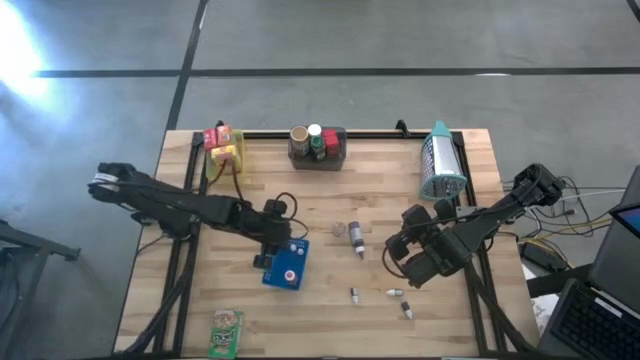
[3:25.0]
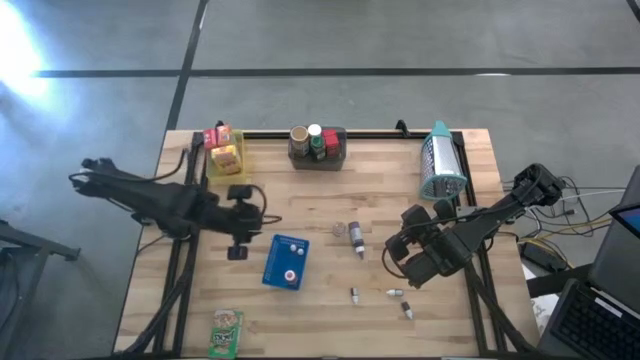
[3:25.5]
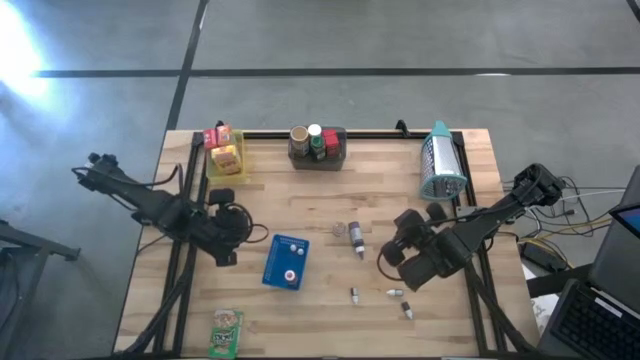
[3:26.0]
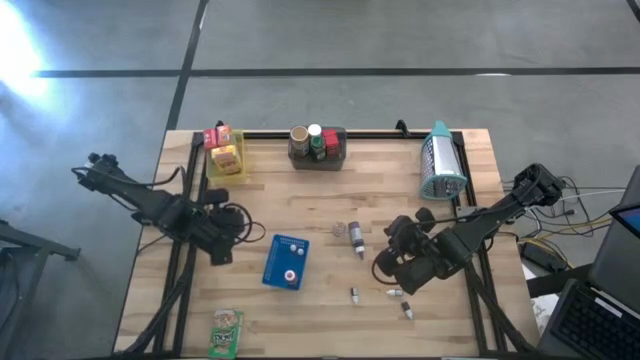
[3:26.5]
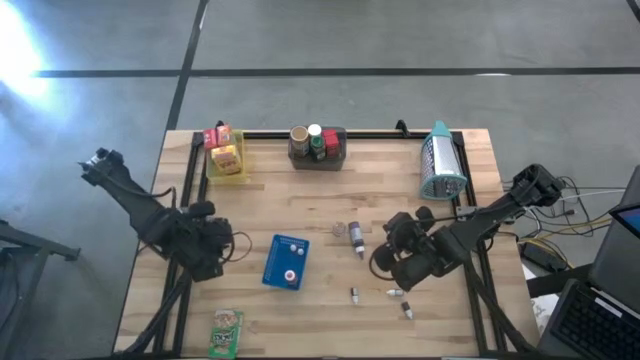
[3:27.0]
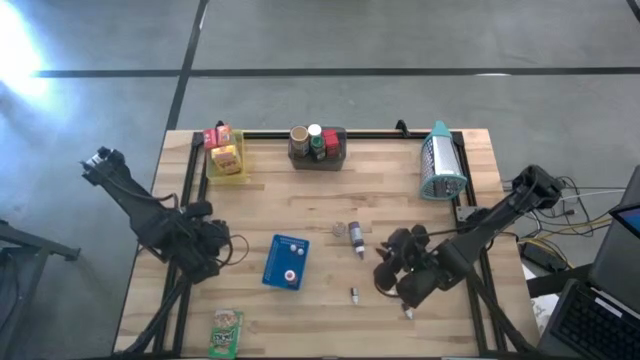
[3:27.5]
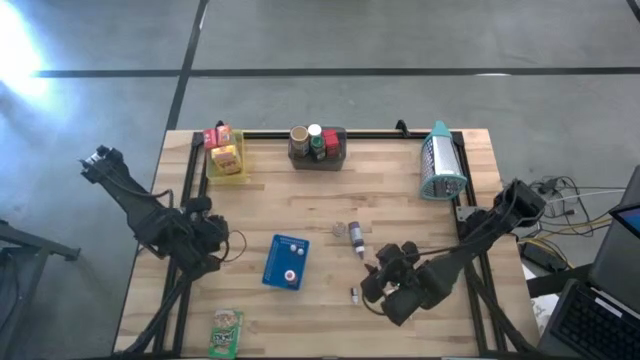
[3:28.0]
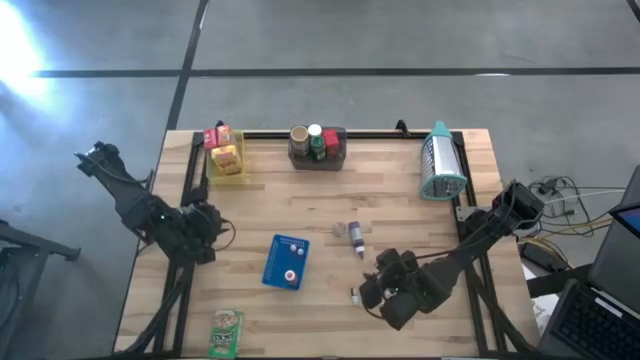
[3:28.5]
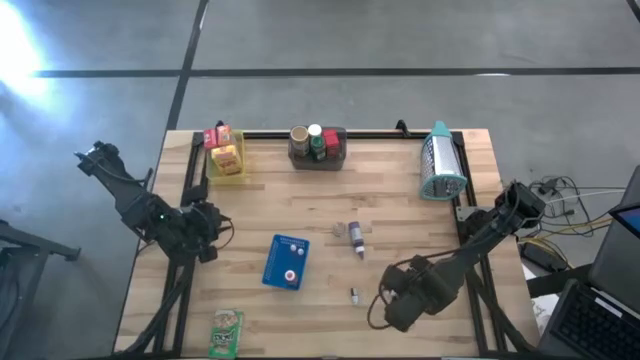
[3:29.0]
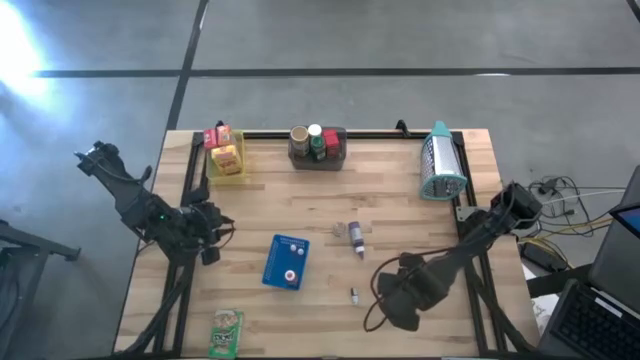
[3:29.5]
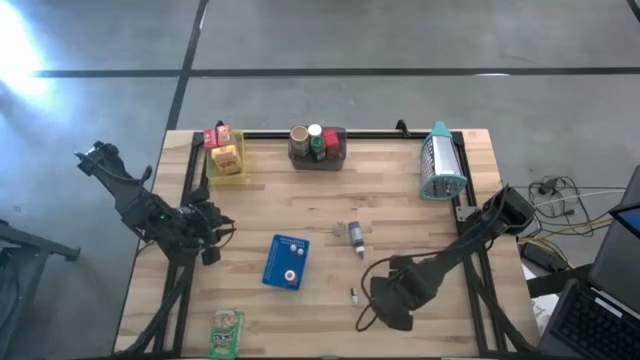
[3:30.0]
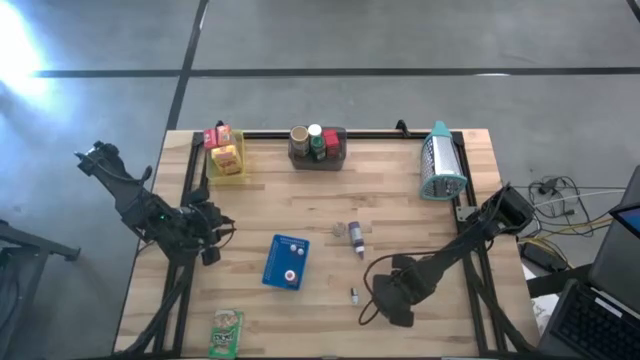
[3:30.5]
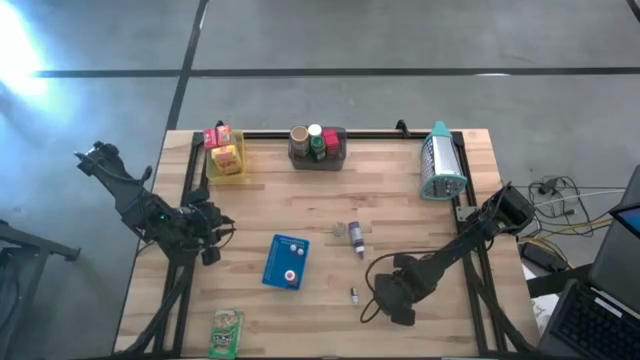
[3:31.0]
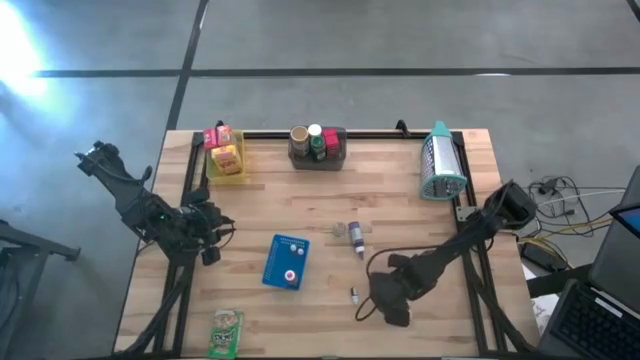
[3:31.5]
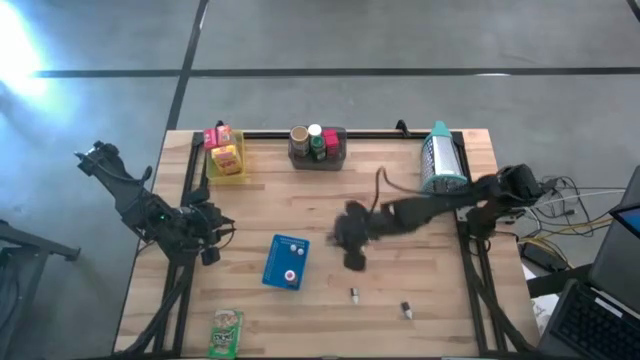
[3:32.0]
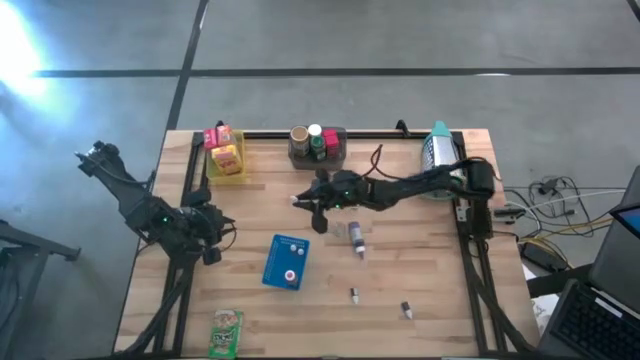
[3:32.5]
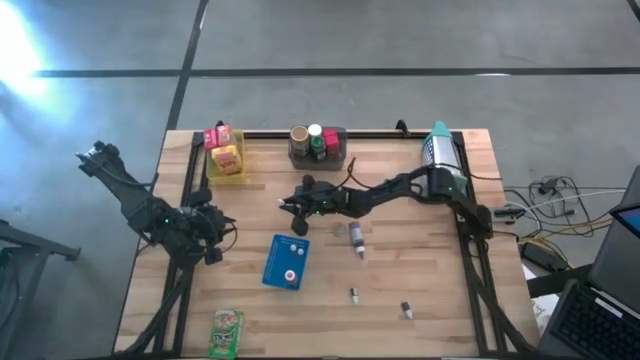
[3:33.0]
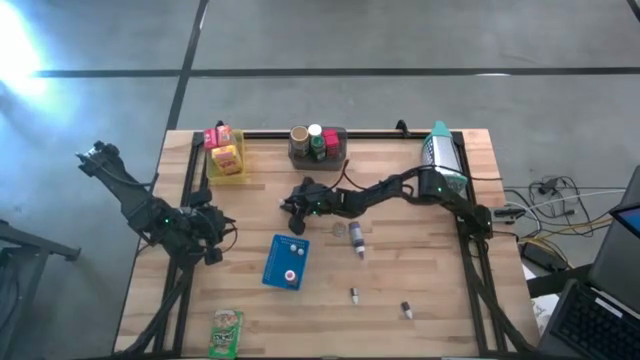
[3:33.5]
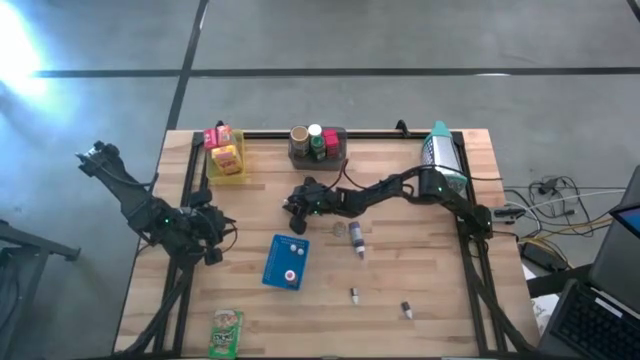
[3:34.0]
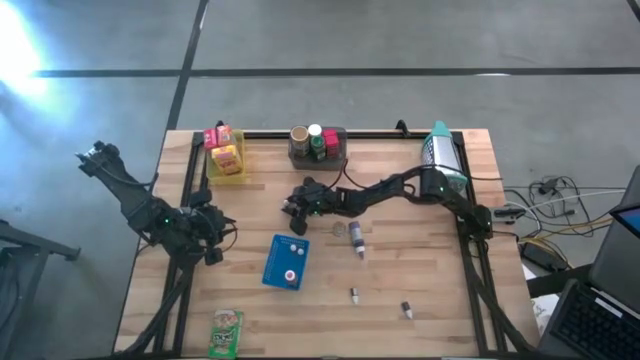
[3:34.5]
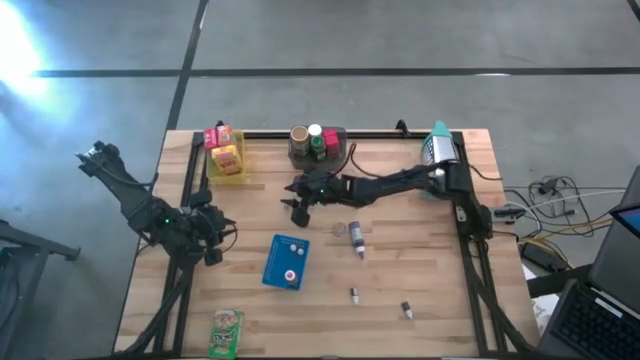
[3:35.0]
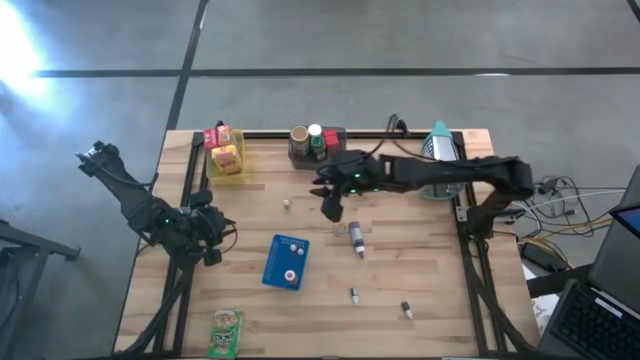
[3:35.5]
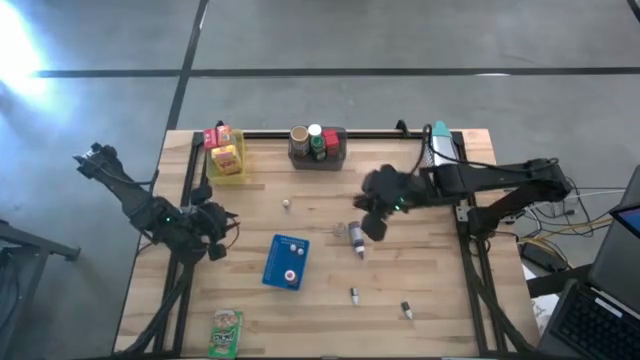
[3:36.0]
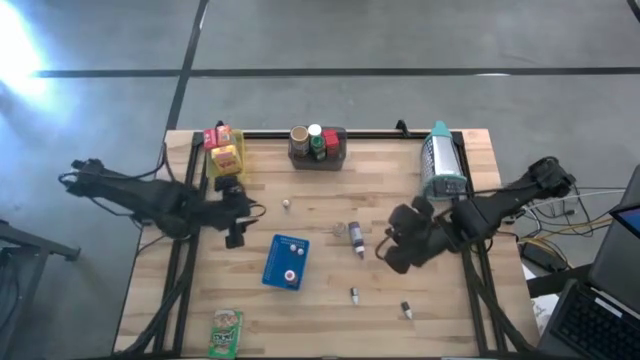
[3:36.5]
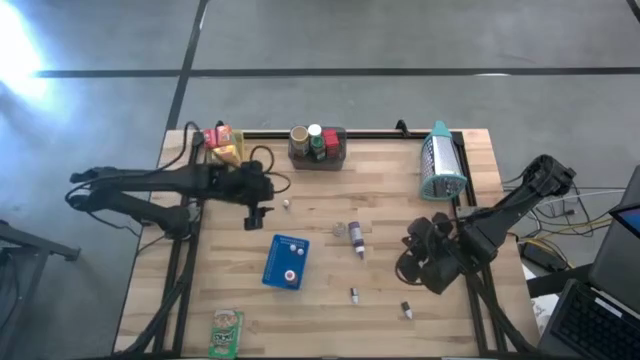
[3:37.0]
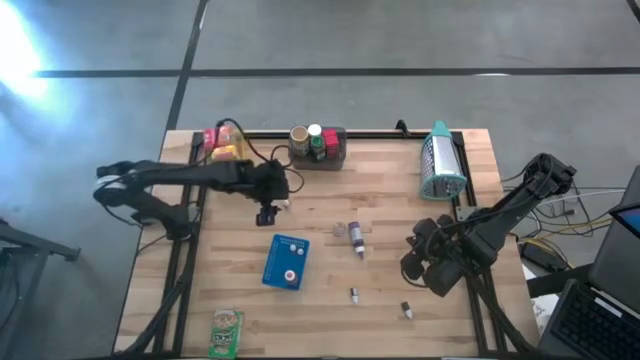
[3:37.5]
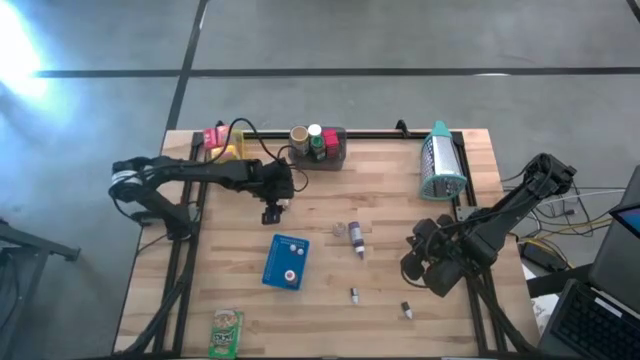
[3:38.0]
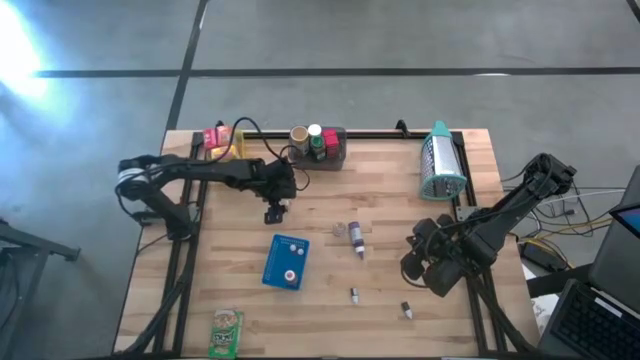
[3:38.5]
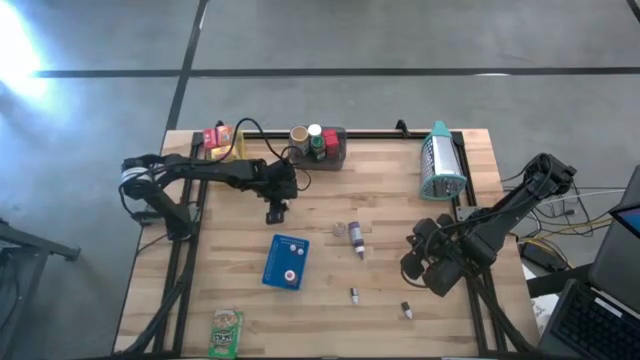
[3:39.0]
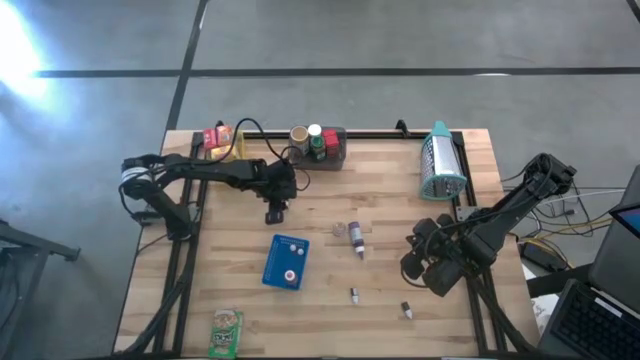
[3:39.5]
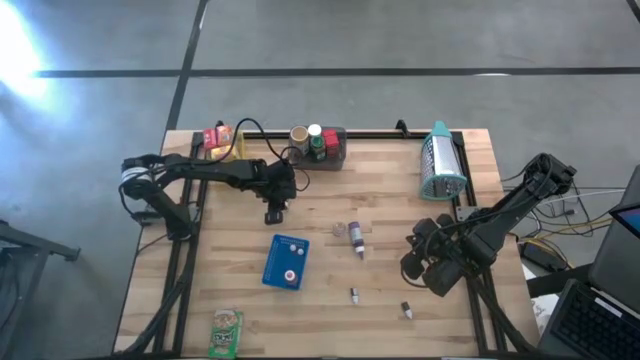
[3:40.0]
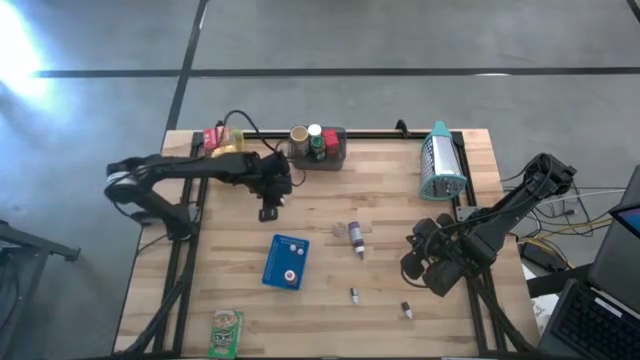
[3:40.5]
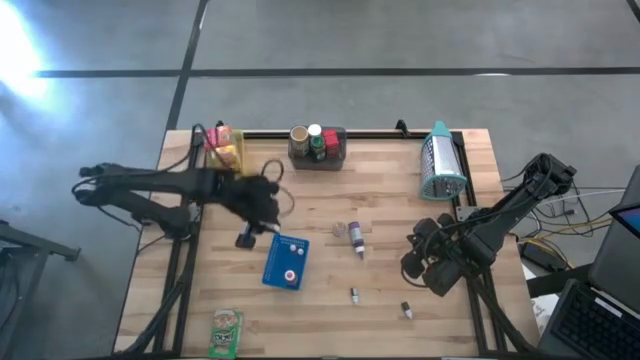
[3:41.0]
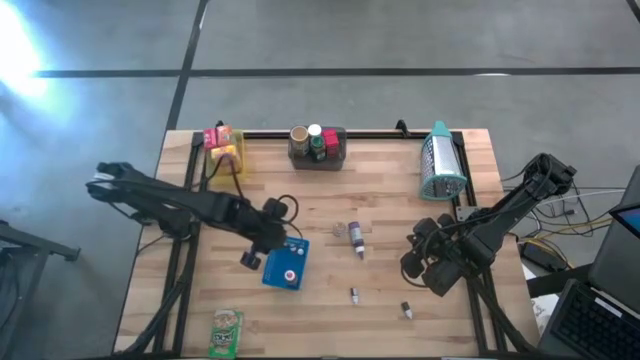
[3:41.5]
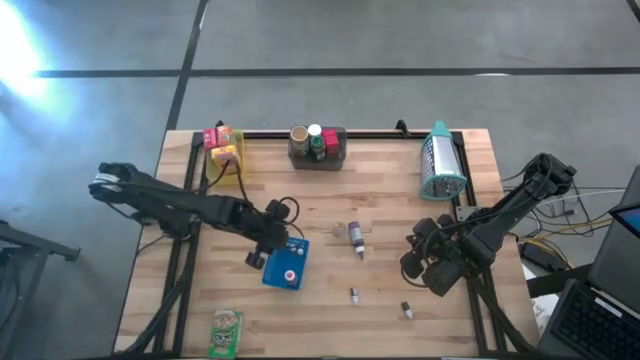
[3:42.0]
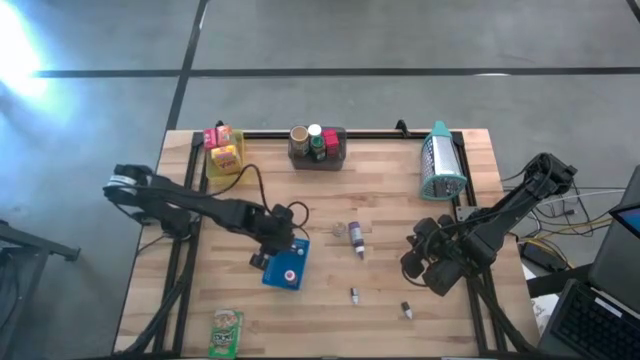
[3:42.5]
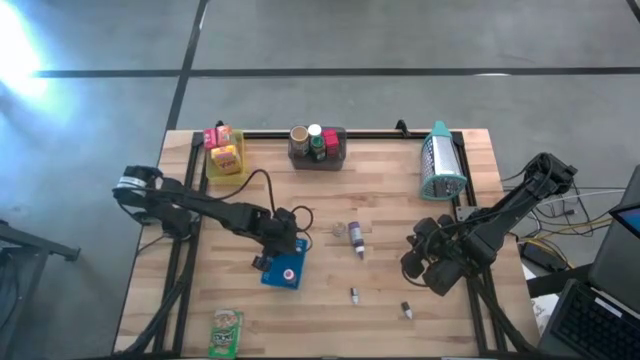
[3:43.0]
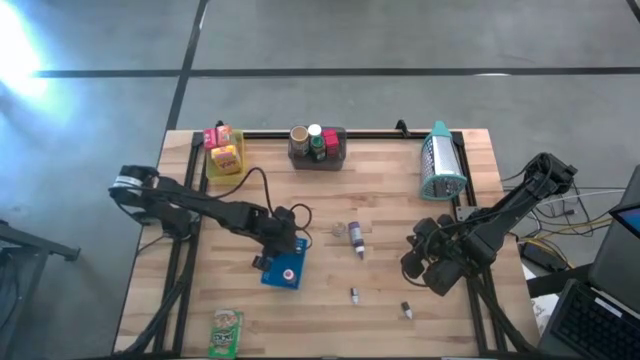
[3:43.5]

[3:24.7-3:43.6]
Task: Pick & Place Kitchen Items
Put the green food coloring bottle into the blue bin

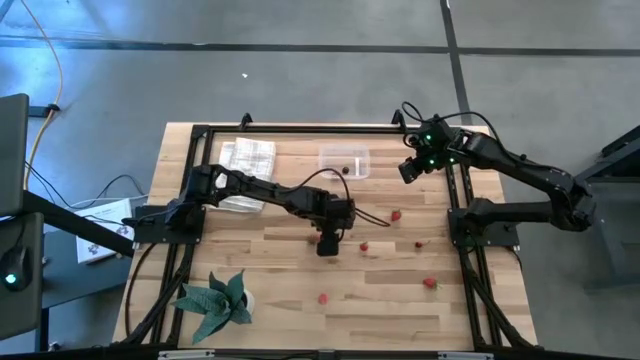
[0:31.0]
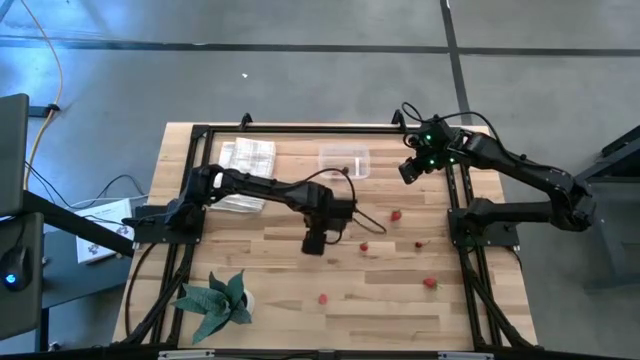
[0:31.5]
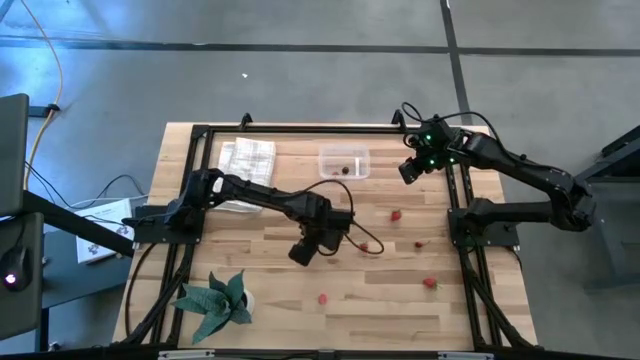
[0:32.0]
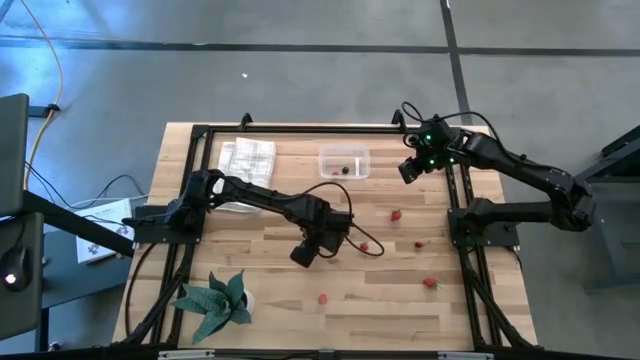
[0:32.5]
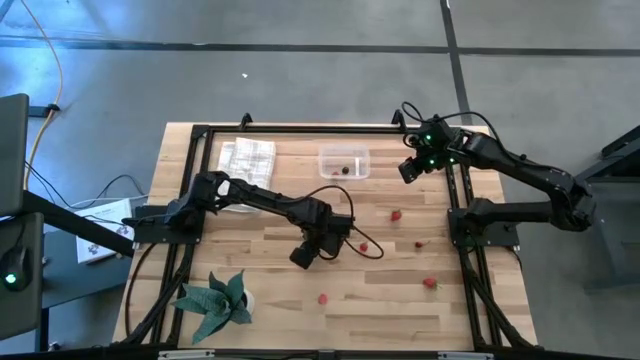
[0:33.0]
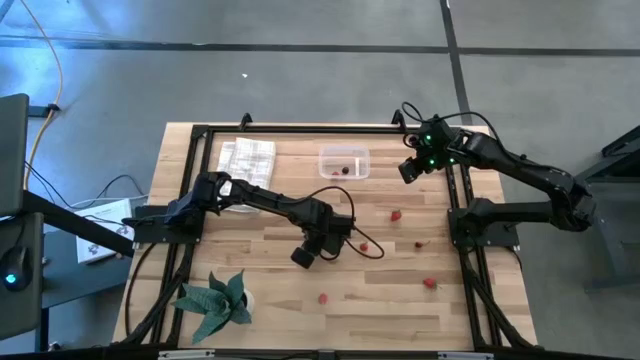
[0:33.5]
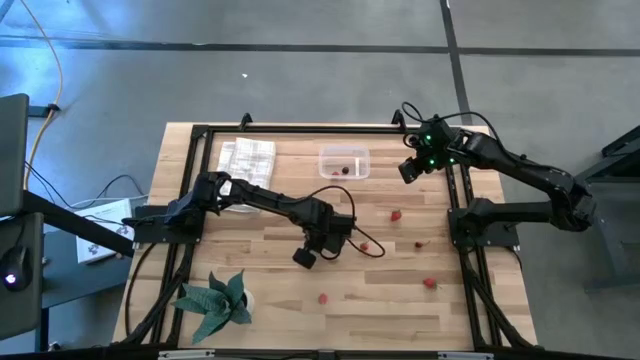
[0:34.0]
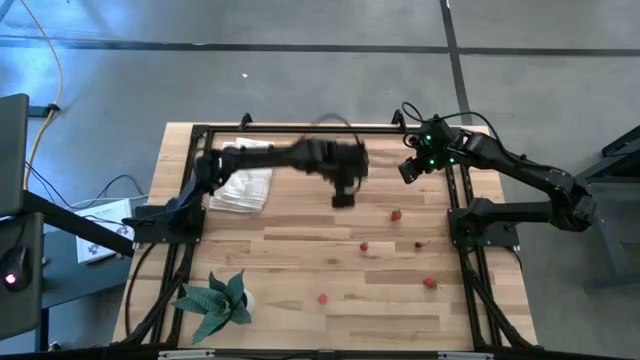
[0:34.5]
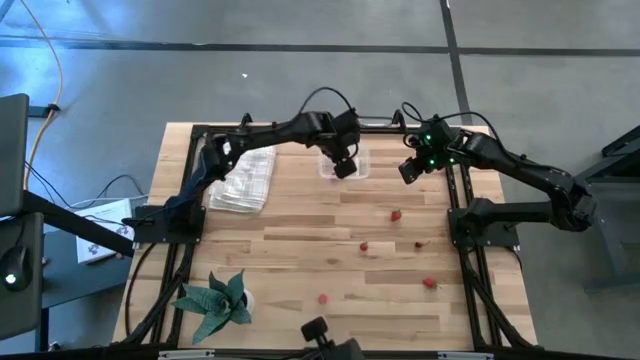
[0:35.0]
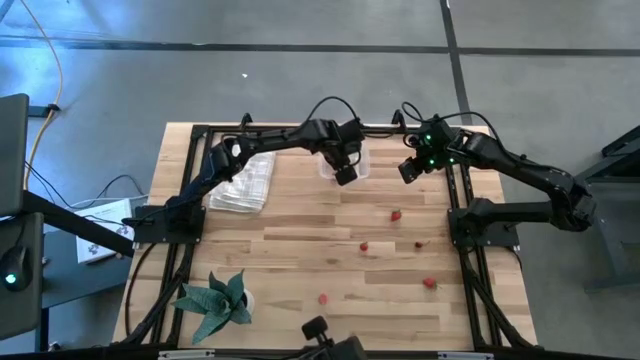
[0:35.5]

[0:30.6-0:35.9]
Task: Pick and placing Produce into tupperware
Put the red strawberry into the transparent container
